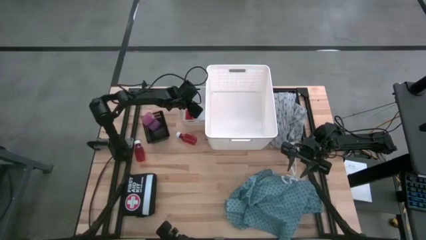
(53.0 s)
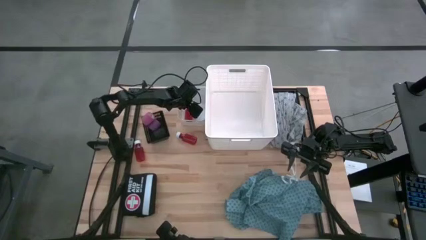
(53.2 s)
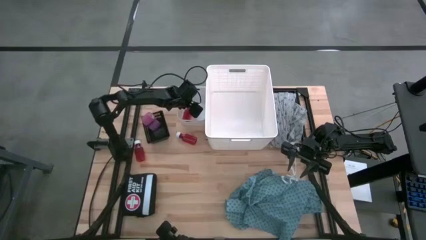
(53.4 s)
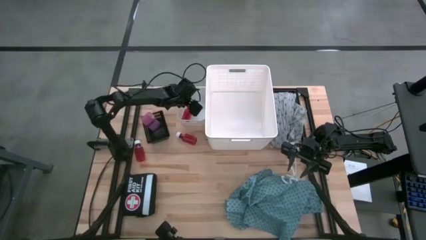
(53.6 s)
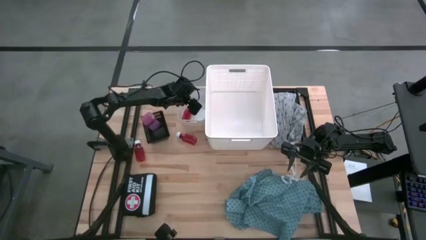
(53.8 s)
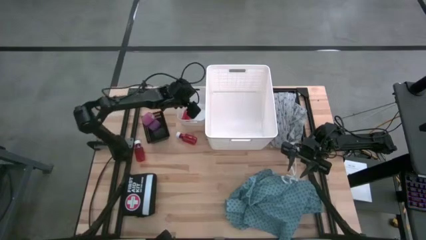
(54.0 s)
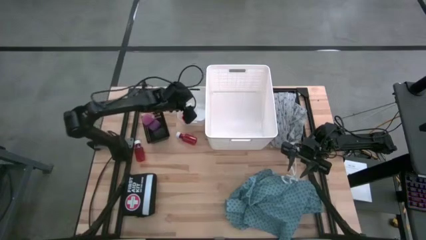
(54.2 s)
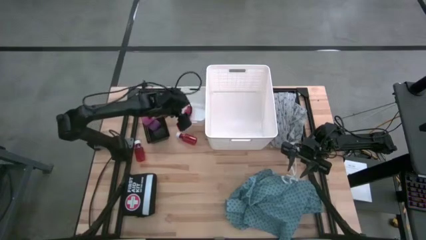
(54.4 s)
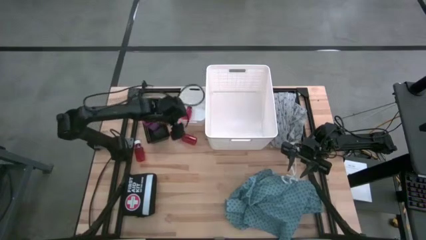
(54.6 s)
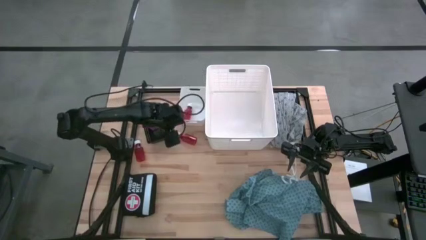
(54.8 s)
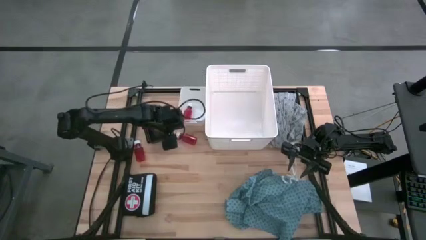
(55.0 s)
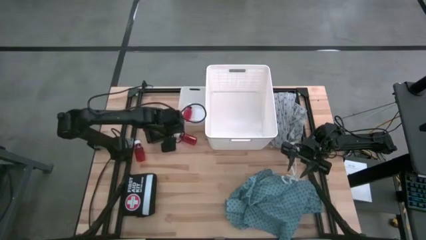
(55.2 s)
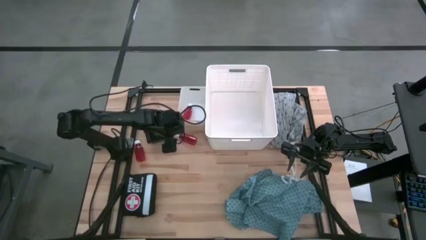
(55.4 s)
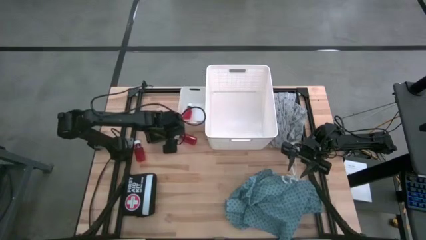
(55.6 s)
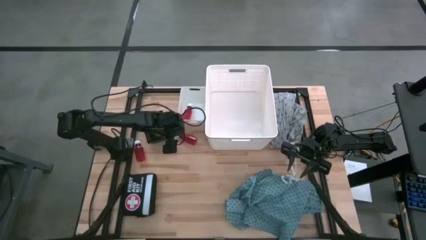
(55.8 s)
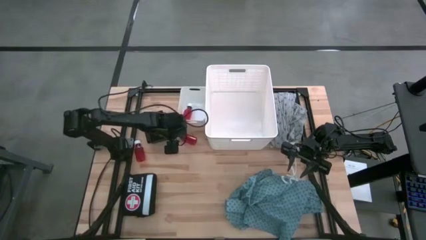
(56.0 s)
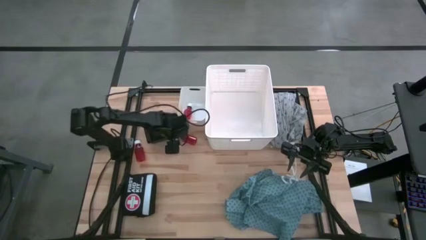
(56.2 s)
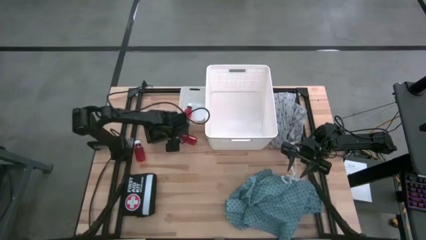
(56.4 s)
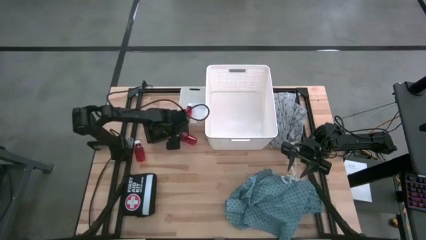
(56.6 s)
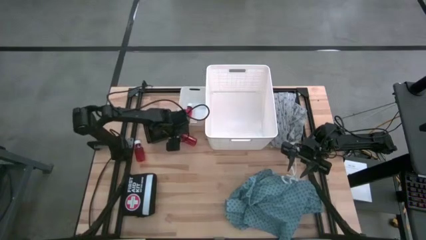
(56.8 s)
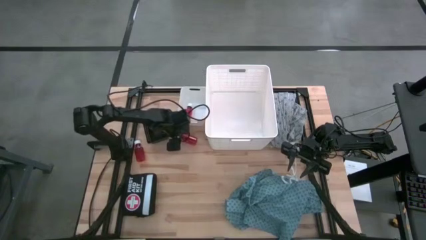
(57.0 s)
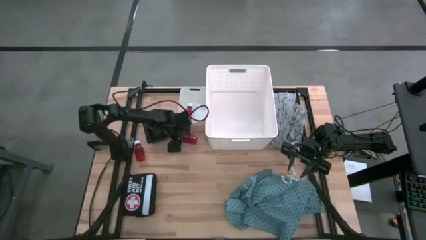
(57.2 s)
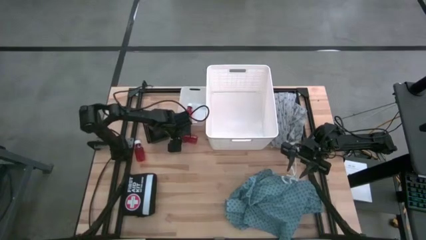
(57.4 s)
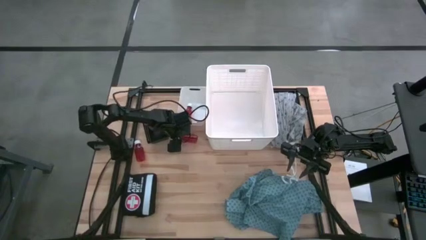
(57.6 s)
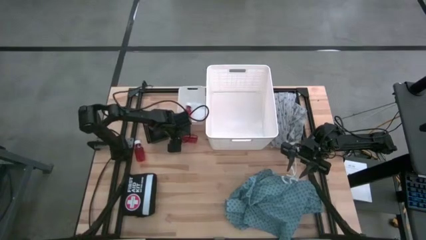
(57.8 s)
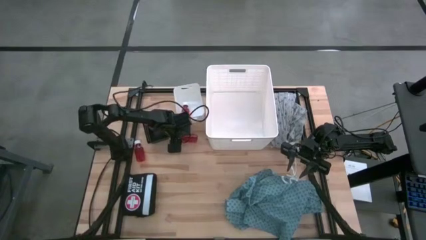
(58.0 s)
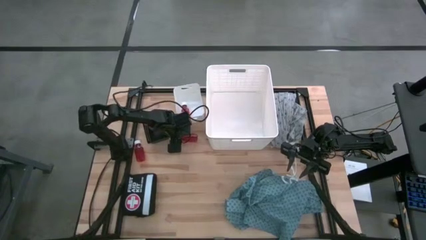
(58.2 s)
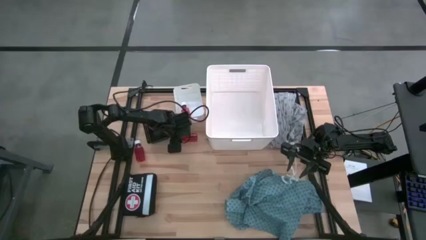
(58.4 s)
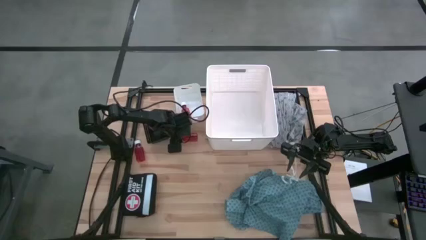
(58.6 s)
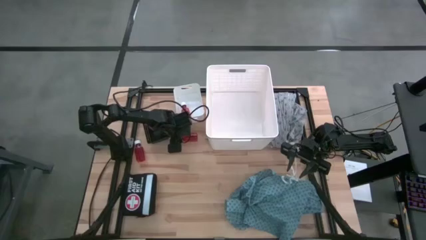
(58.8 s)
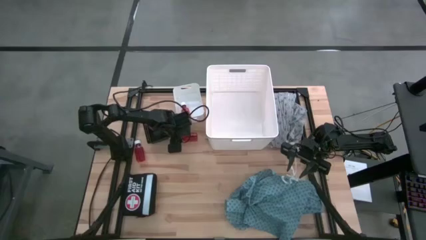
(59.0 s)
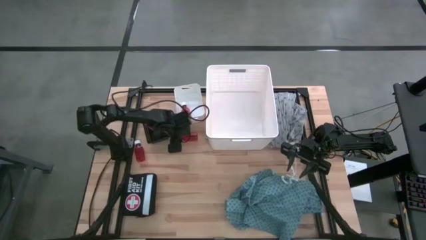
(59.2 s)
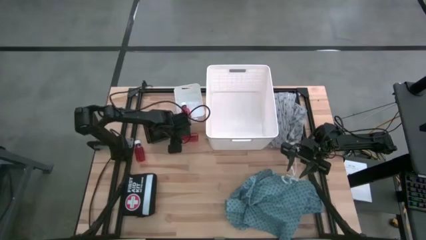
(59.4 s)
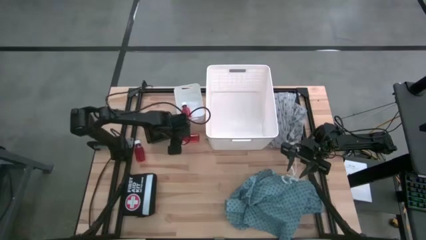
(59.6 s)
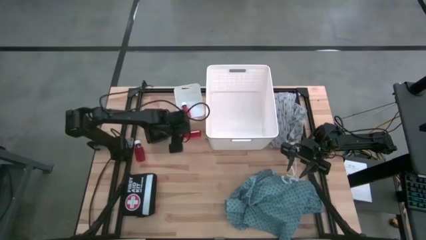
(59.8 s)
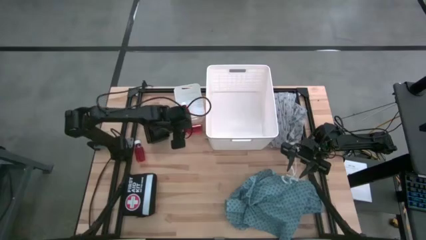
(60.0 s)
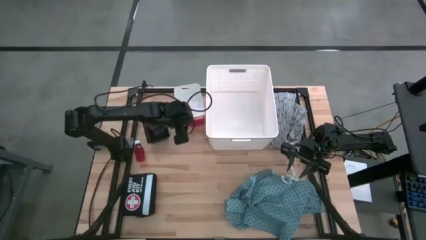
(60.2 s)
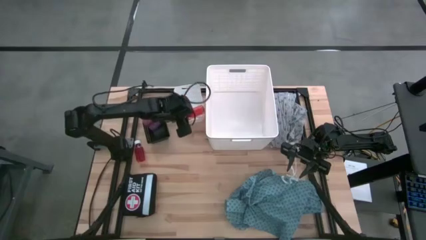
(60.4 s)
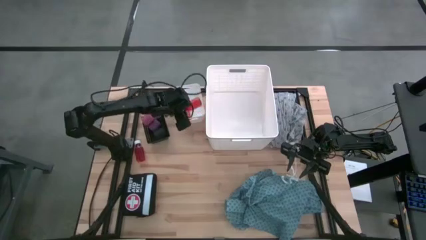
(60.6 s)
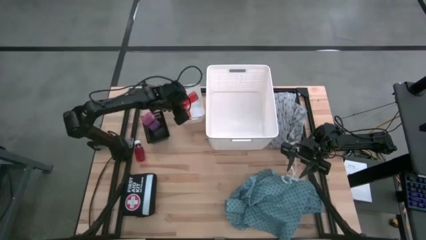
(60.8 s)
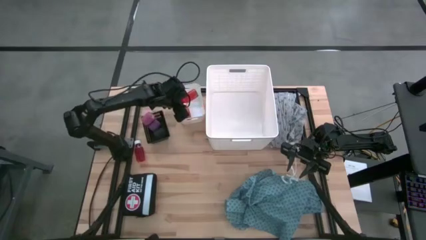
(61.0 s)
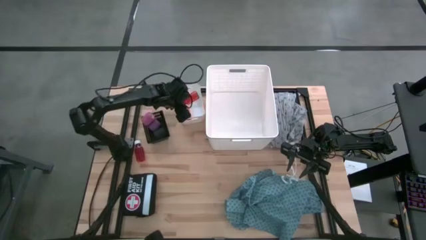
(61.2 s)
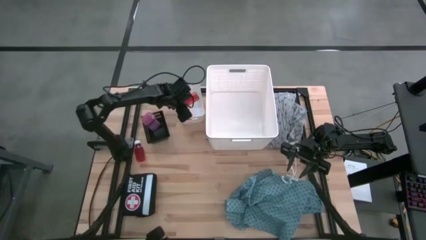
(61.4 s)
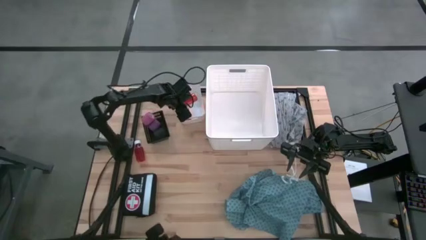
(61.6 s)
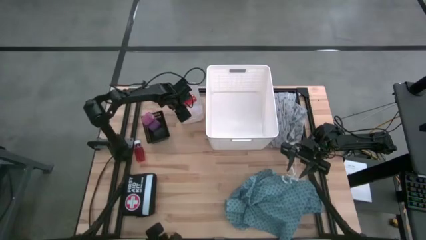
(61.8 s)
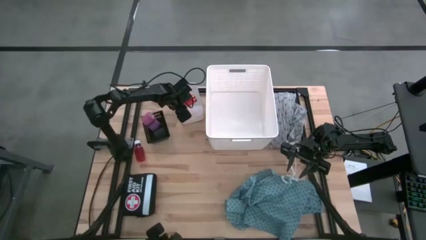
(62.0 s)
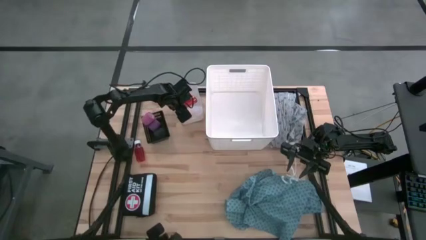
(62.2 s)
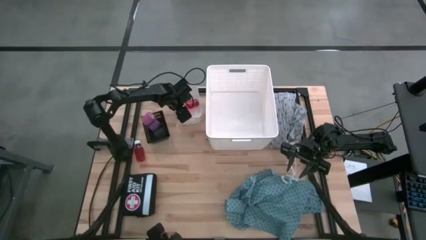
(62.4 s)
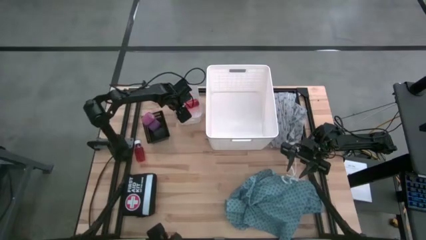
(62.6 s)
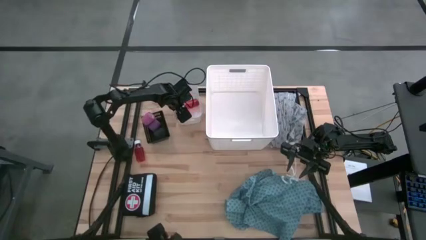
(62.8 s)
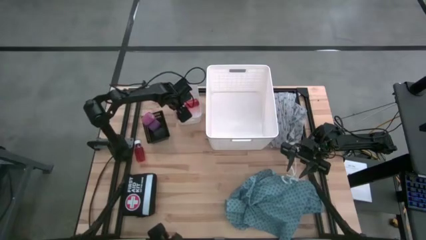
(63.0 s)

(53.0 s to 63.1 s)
Task: Pick & Place Medicine items
Put the right red pill bottle into the white bin

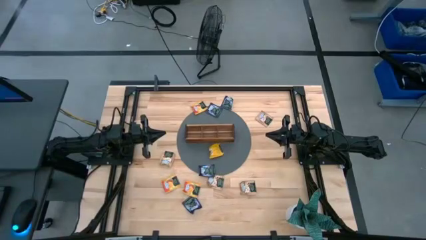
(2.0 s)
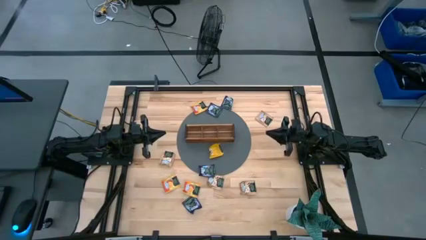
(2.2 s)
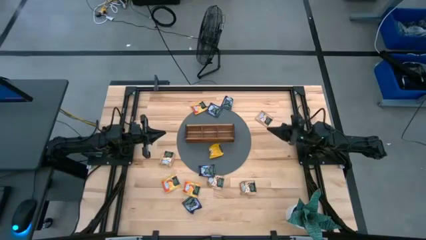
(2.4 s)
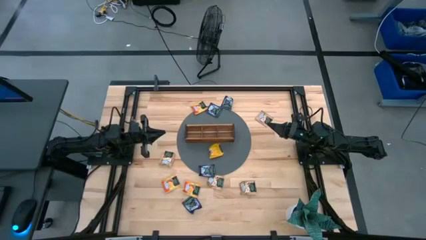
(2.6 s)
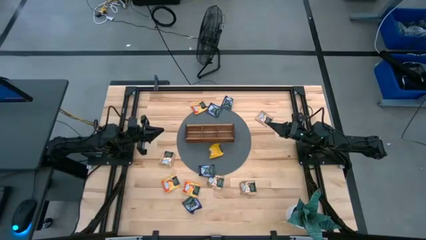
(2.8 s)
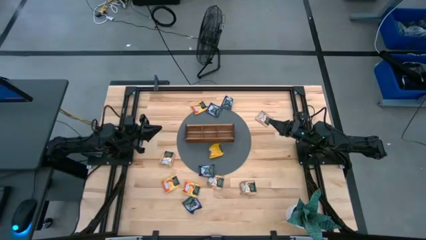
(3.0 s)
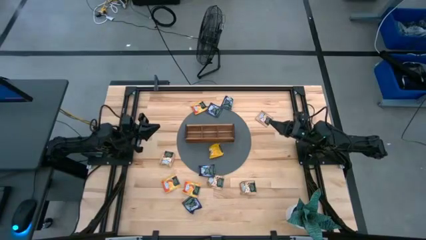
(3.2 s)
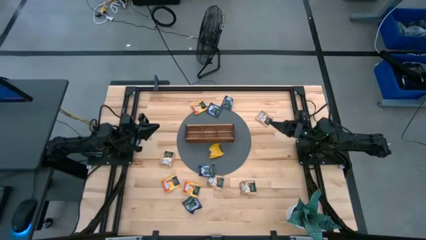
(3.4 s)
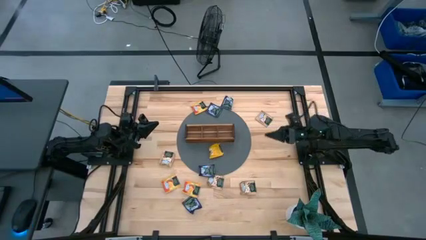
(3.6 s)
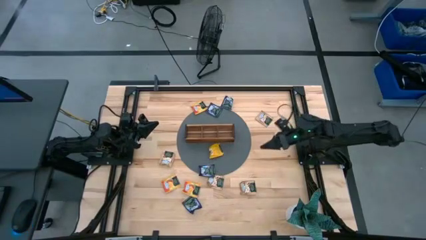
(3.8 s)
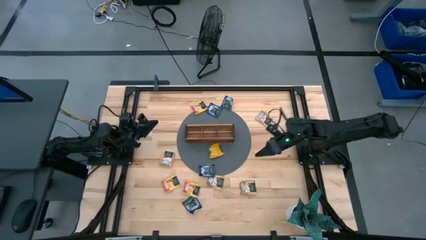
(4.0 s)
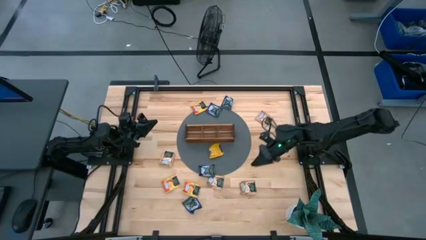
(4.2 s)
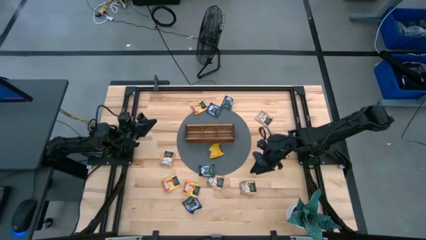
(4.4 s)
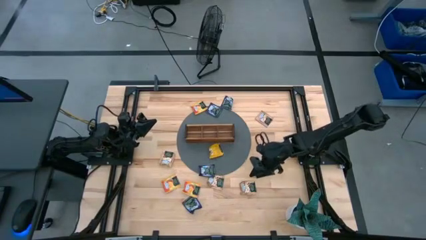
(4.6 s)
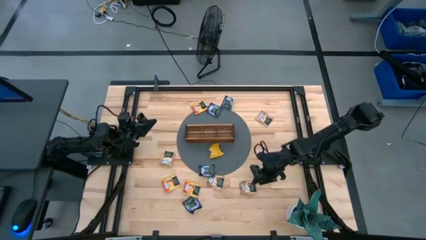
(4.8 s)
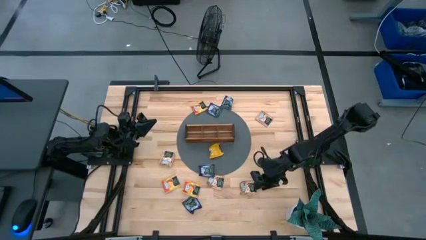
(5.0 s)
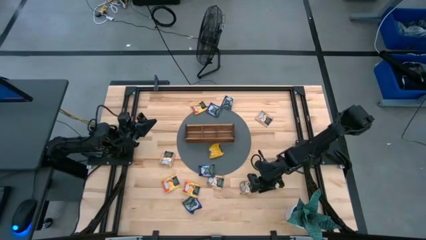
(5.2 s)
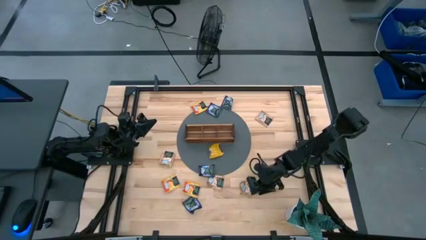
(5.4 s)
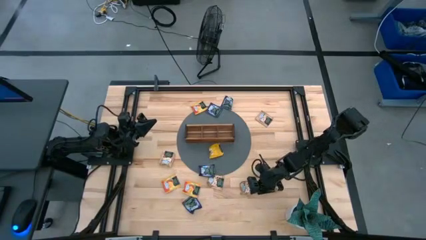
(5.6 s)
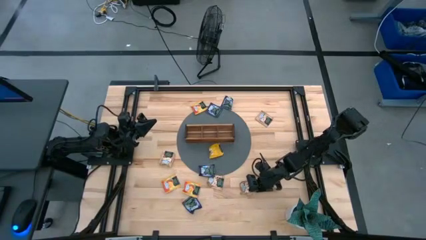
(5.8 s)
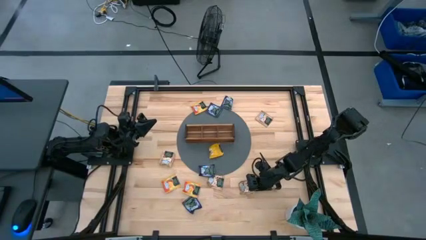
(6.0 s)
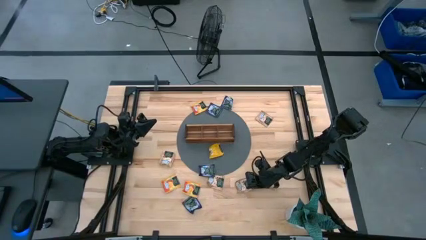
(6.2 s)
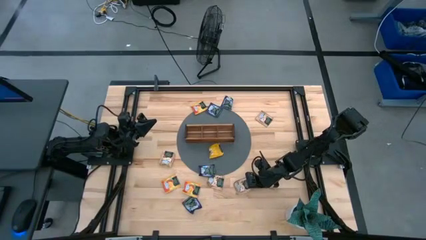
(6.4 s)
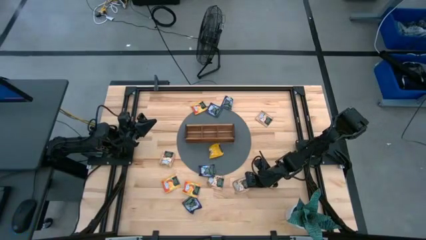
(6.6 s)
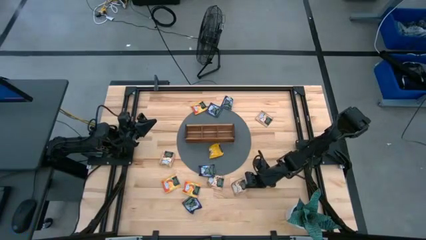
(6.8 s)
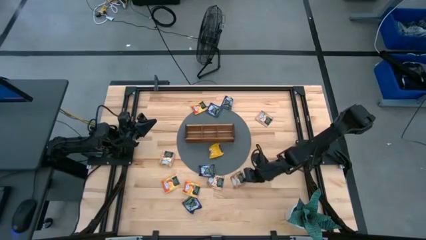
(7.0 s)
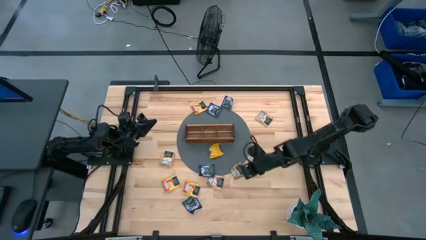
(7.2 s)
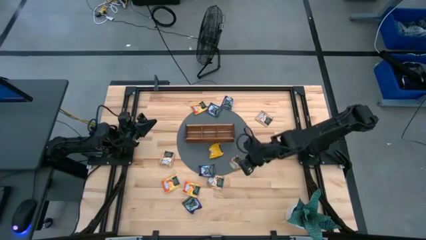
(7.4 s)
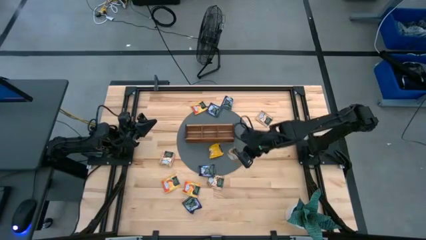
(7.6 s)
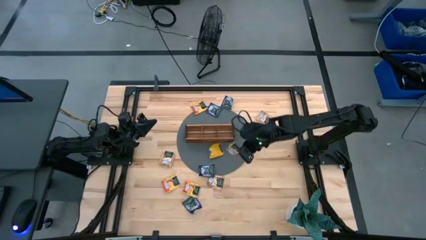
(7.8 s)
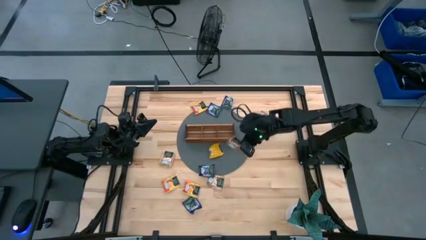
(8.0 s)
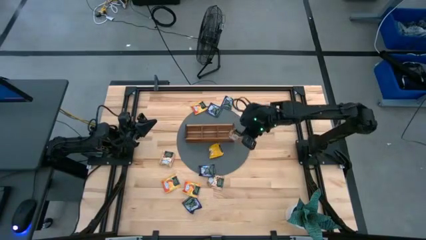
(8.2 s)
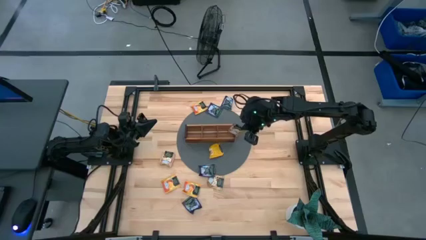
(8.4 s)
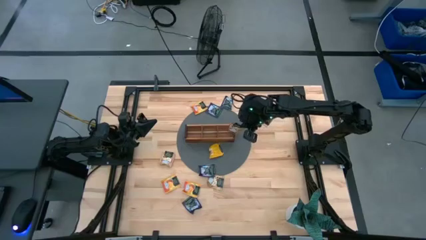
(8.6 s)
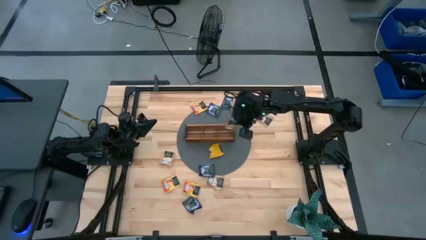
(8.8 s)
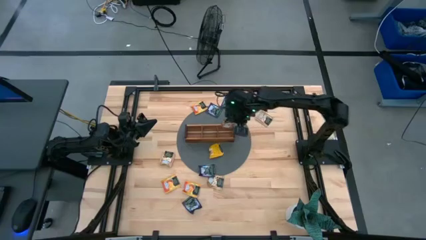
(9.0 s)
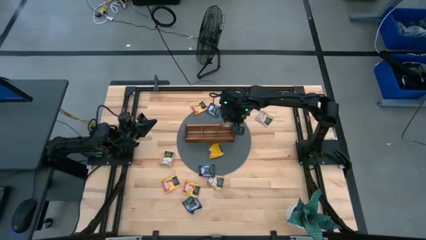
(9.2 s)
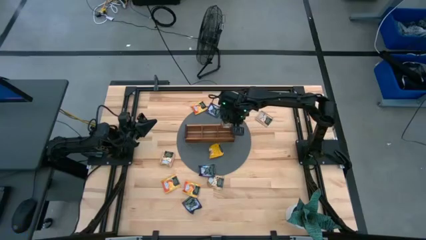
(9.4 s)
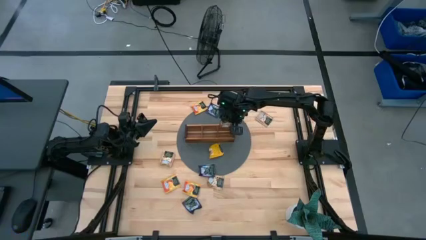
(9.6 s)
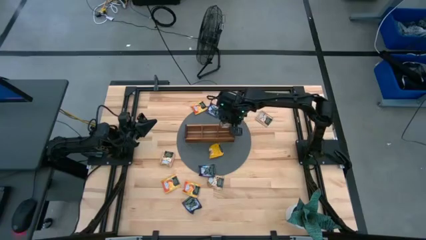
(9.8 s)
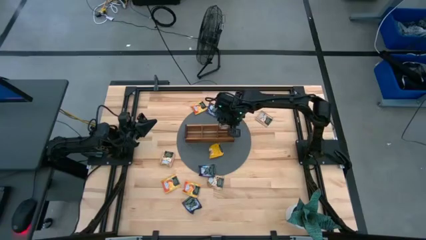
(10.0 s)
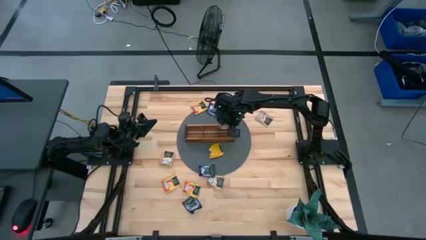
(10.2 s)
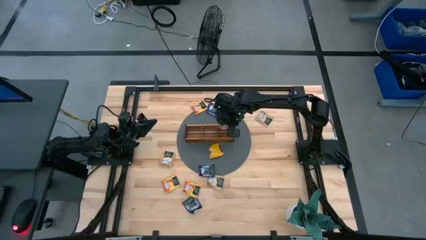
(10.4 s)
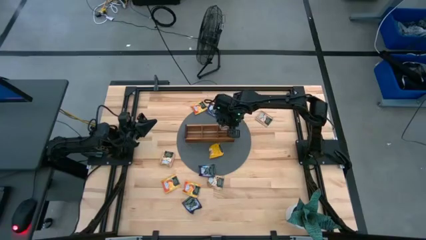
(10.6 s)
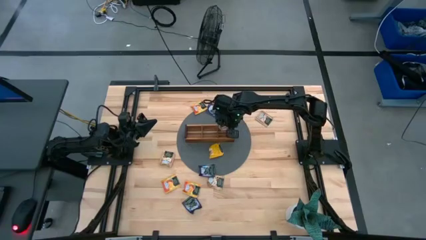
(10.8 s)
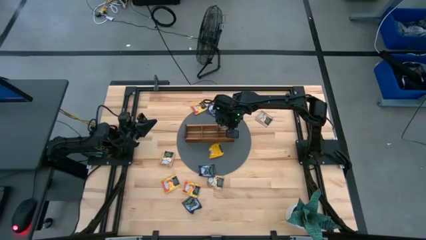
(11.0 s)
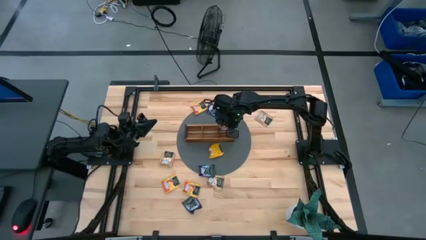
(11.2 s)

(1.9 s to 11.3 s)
Task: Pick & Place Tea
Put the brown tea bag into the right section of the wooden organizer
